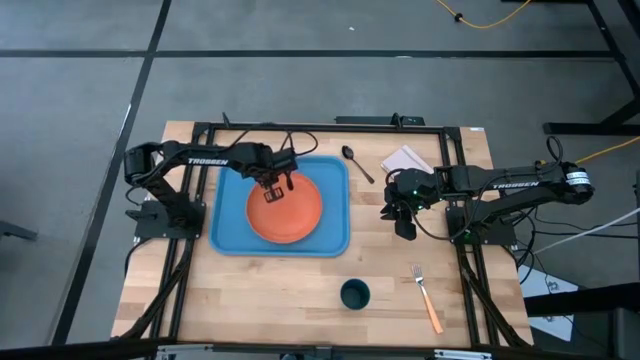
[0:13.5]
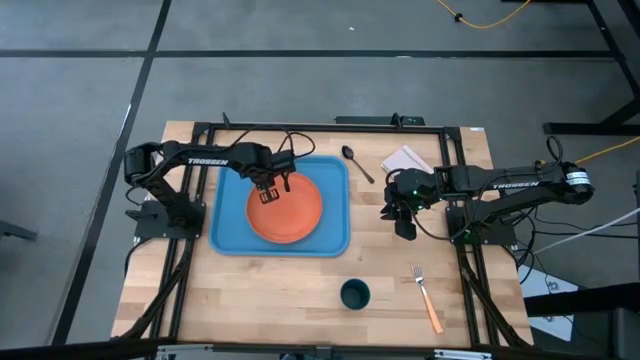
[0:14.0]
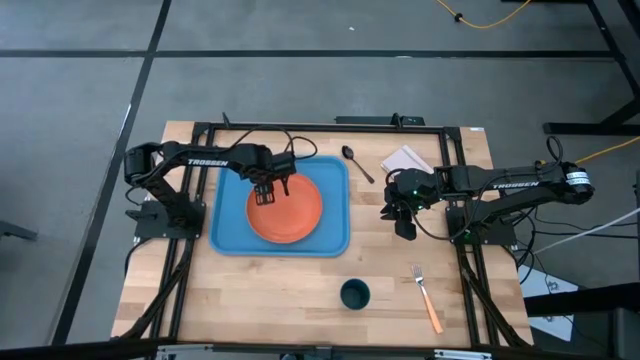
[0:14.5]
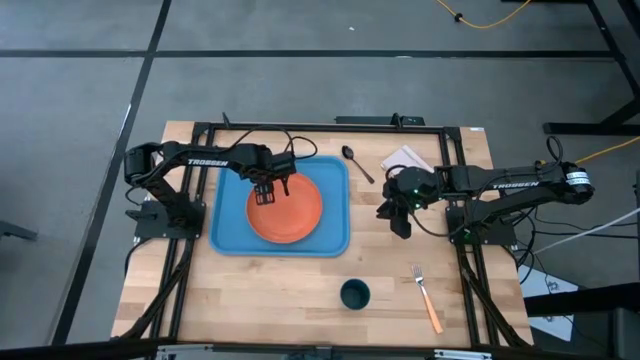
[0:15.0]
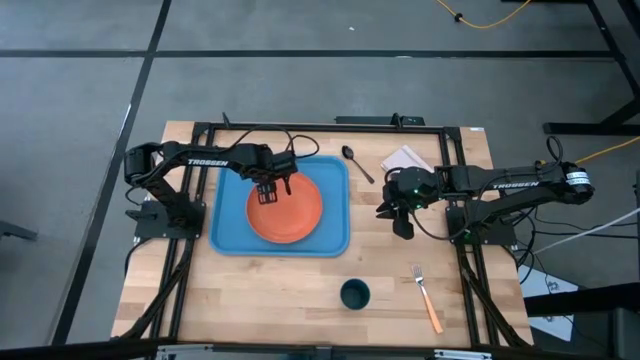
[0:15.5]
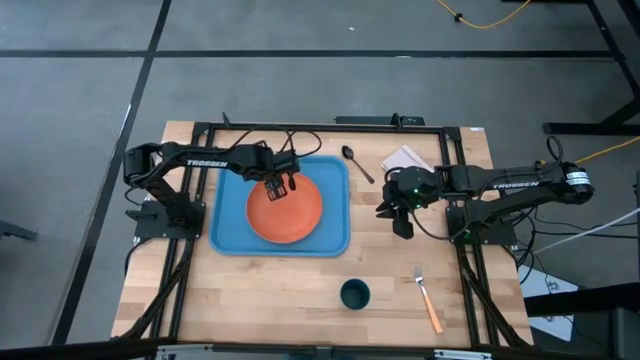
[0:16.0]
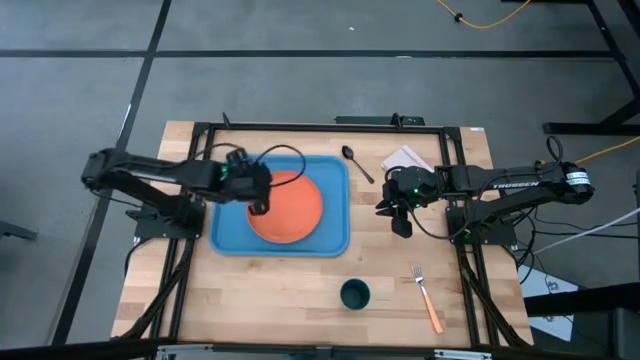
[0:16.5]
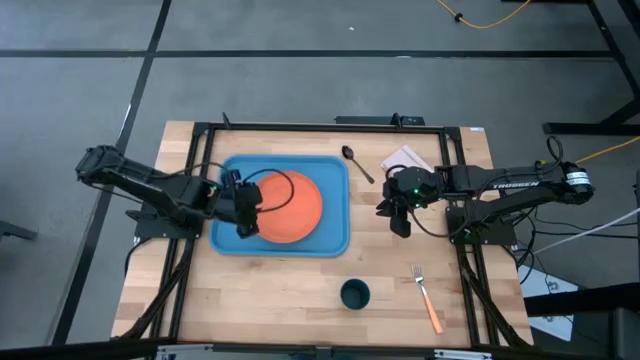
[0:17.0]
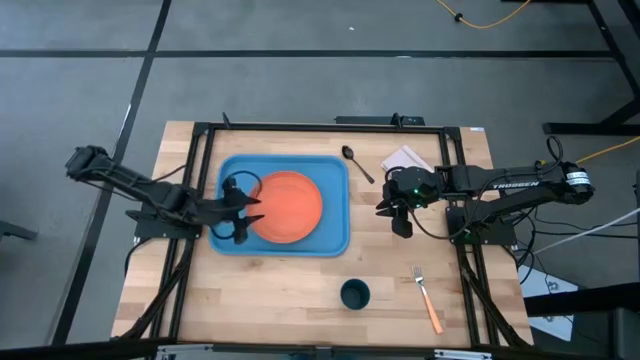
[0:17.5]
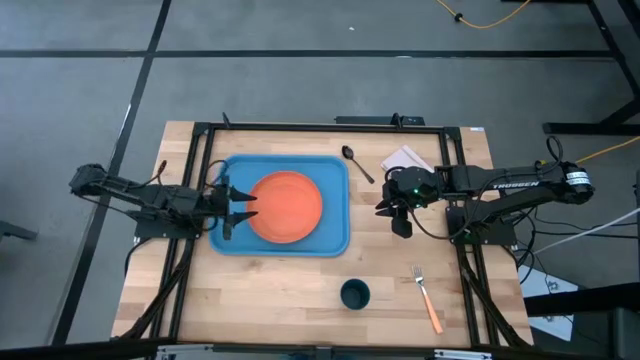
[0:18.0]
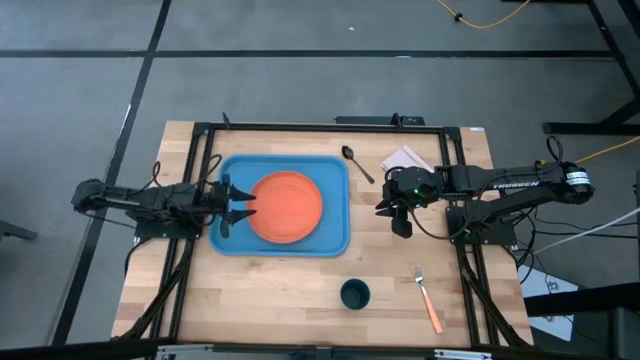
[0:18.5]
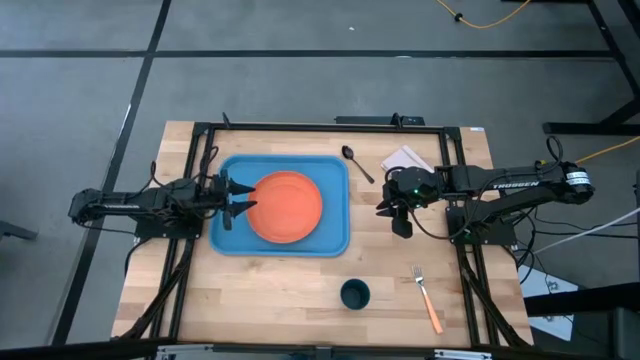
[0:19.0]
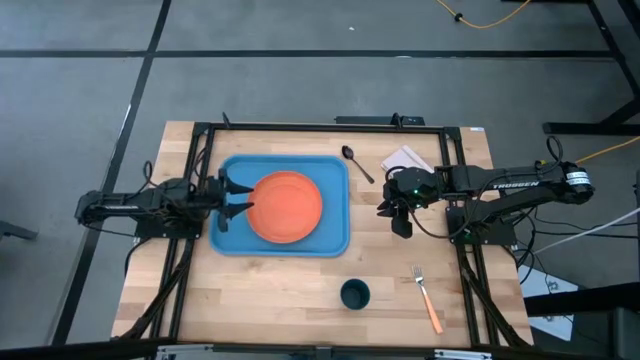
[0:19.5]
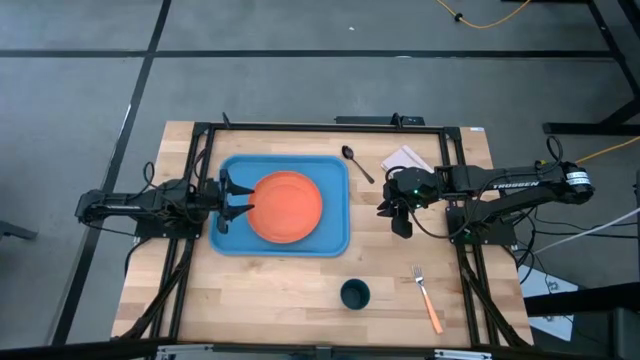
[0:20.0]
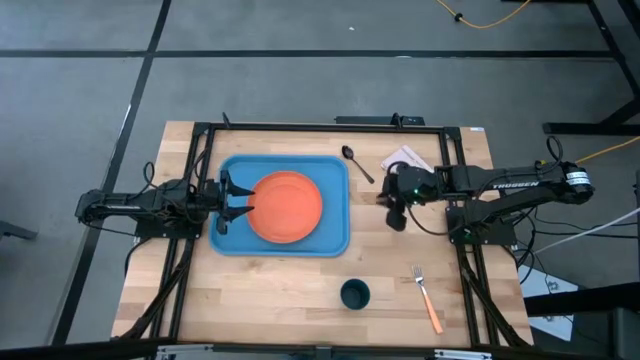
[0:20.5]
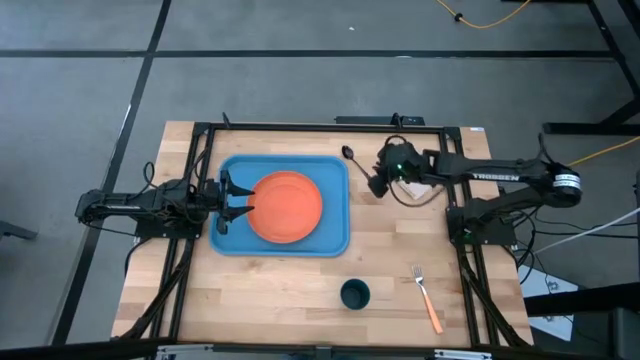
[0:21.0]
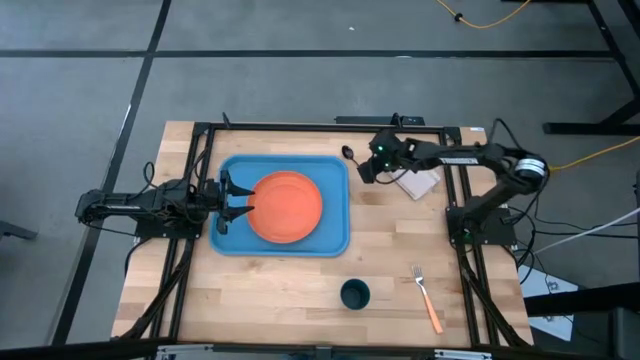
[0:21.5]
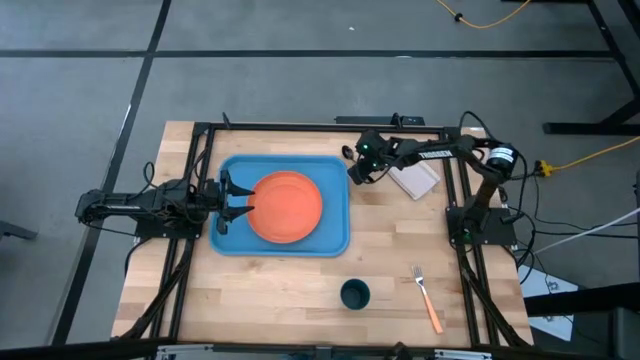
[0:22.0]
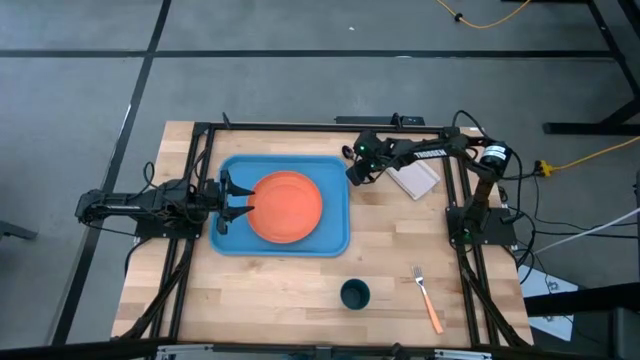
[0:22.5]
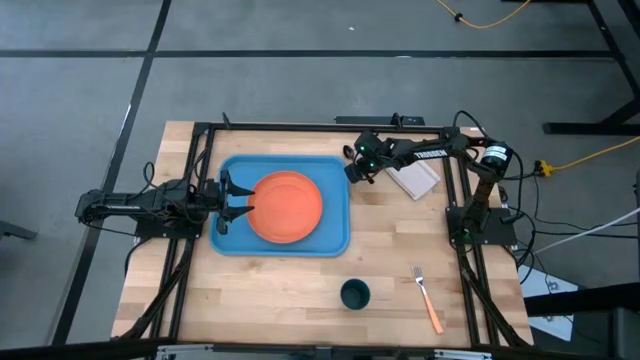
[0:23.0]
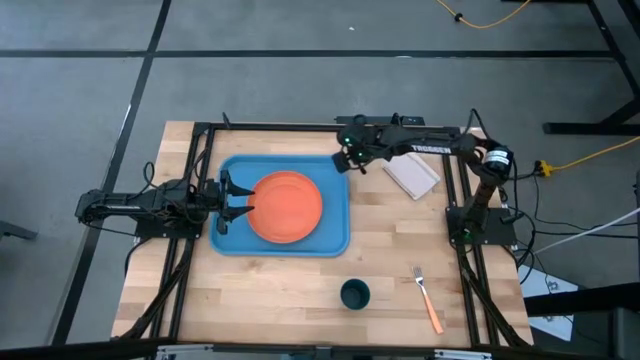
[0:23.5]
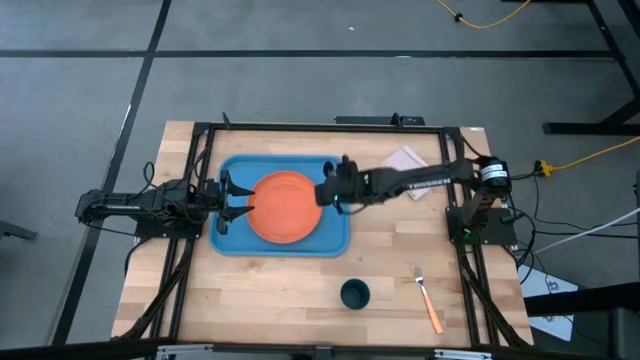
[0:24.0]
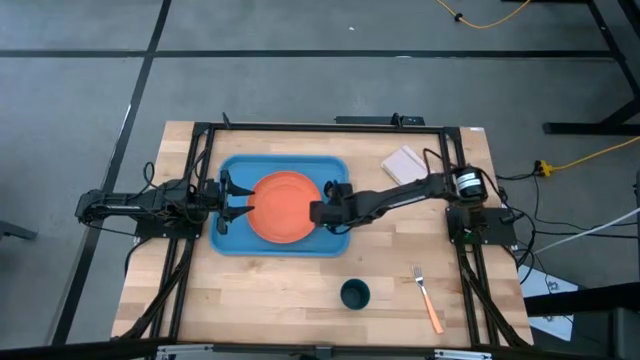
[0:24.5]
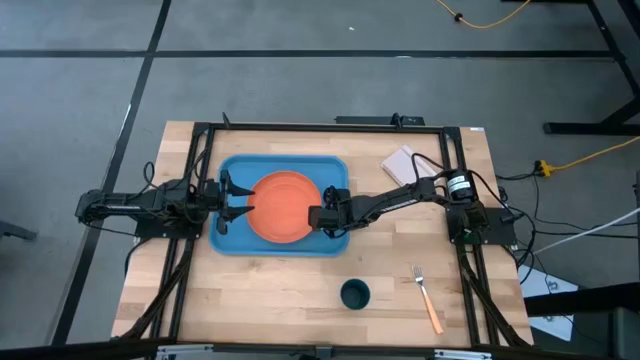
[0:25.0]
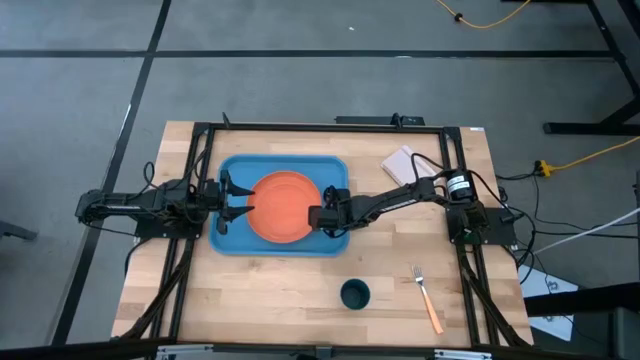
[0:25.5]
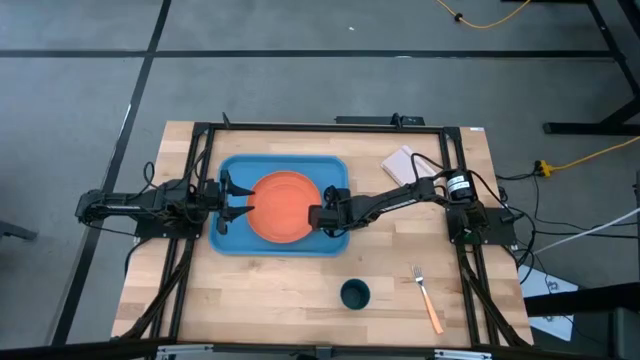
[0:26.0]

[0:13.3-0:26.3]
Task: Pick and place plate/cup/fork/spoon on tray
Put the black spoon on the blue serving tray at the right of the orange plate

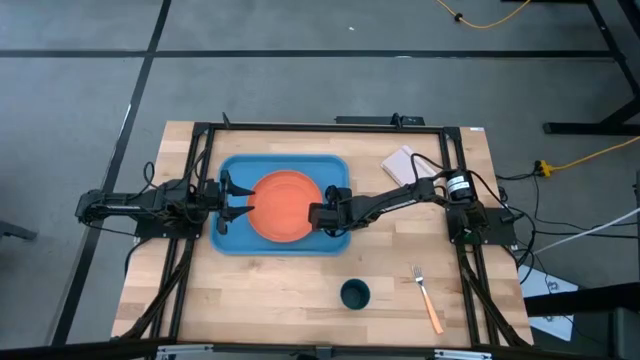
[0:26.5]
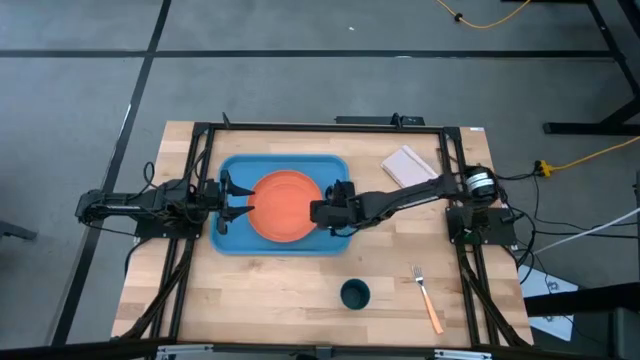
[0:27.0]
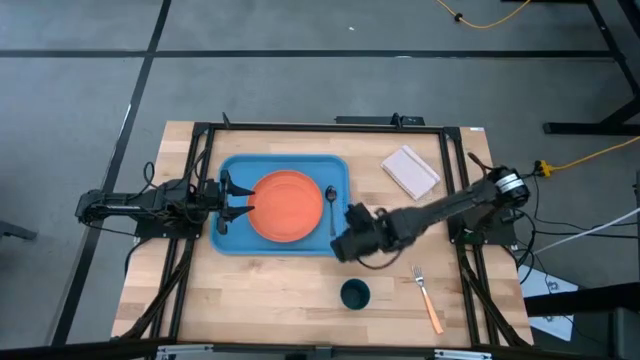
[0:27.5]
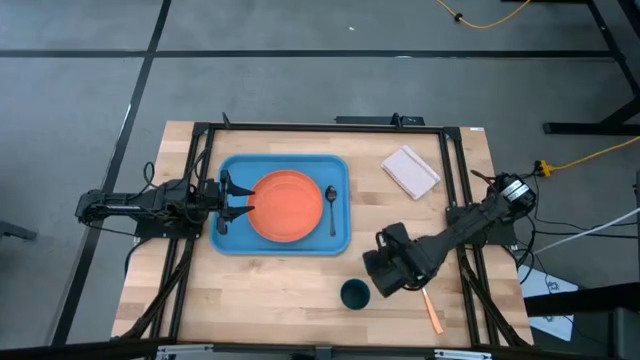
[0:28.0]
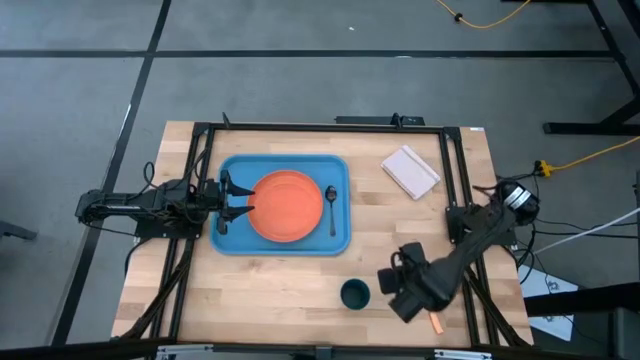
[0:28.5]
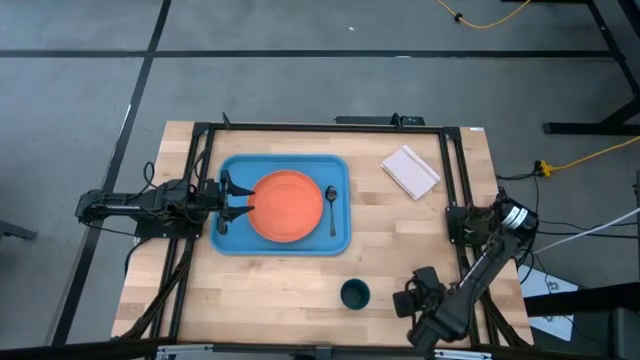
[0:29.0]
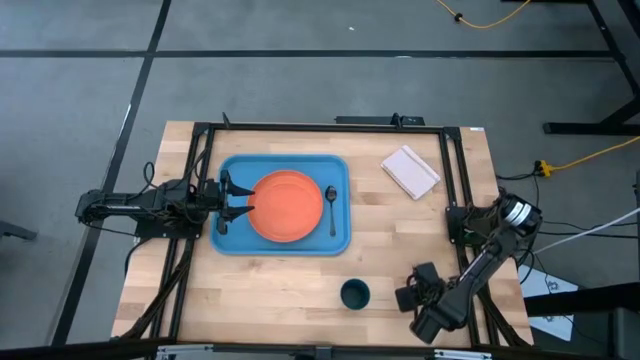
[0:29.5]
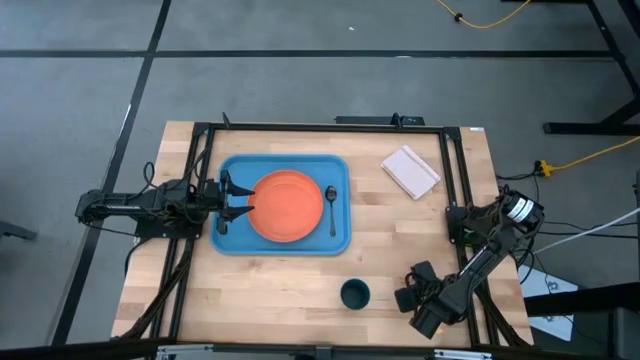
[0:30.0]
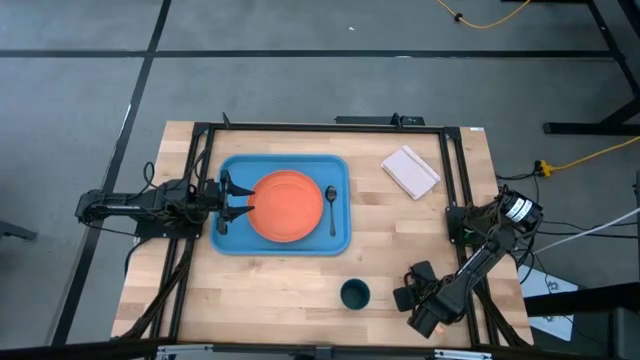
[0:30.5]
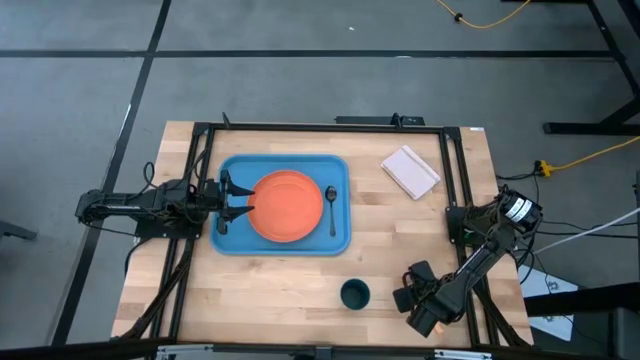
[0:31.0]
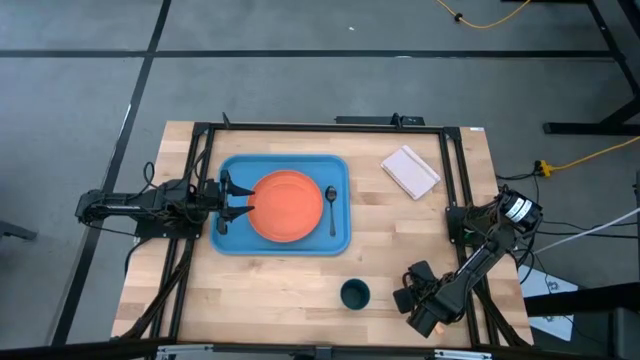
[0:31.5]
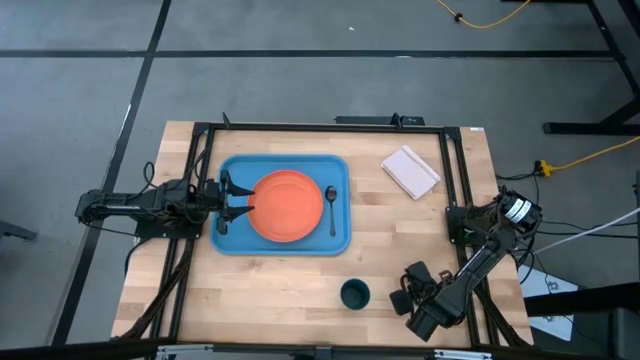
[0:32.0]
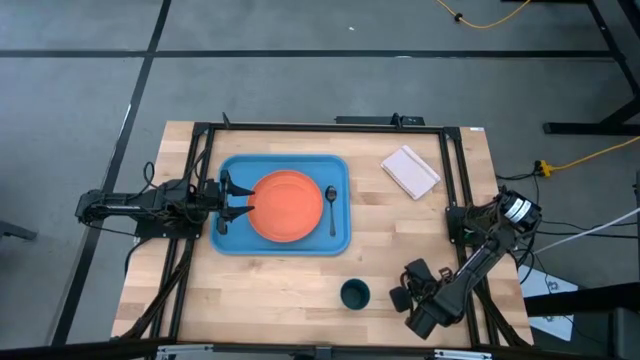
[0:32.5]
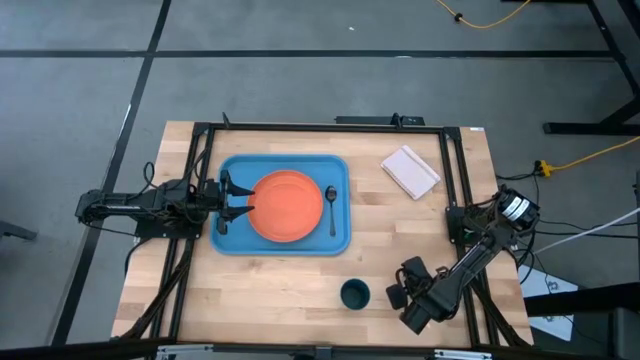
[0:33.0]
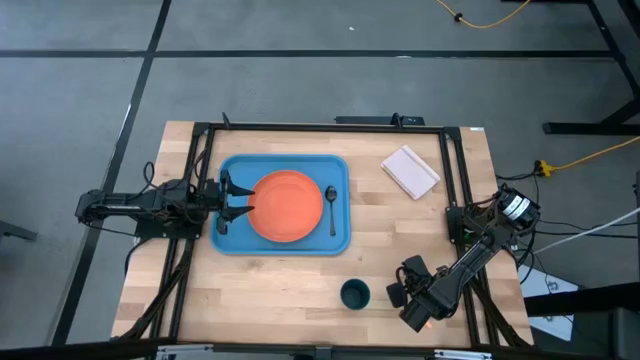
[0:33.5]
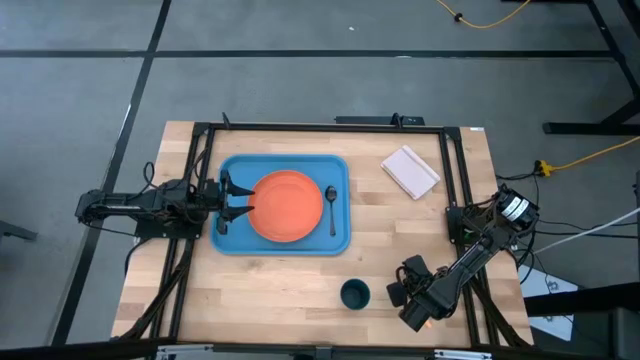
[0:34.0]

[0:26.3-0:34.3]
Put the orange fork on the blue serving tray at the right of the black spoon
